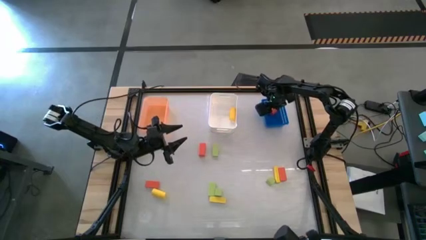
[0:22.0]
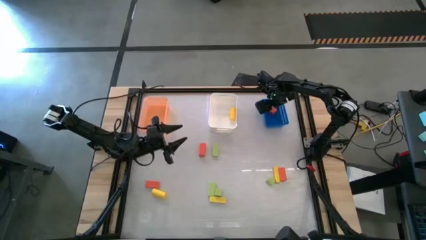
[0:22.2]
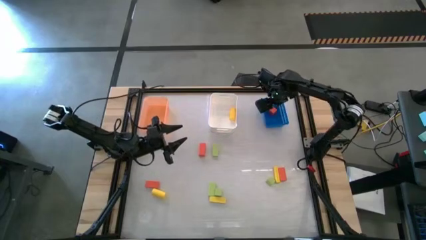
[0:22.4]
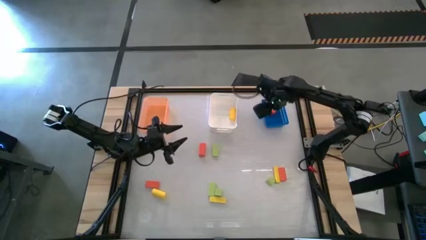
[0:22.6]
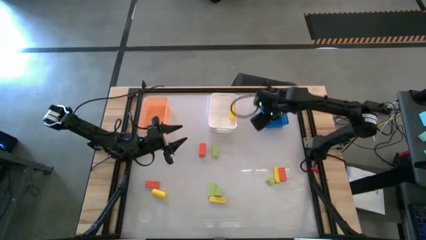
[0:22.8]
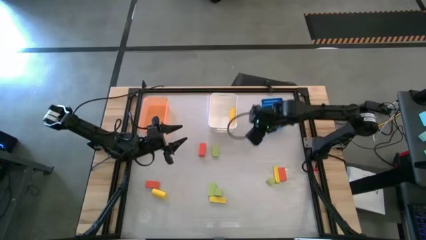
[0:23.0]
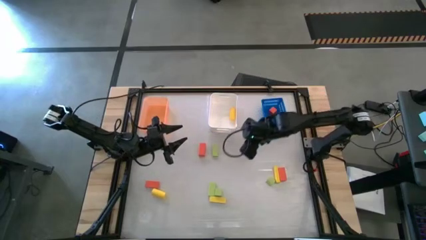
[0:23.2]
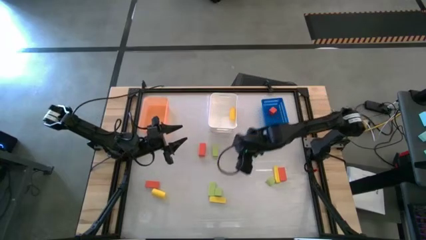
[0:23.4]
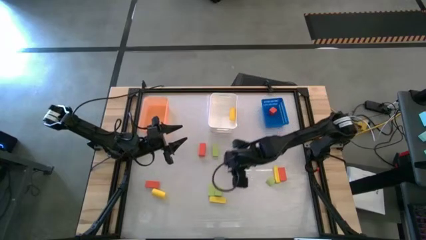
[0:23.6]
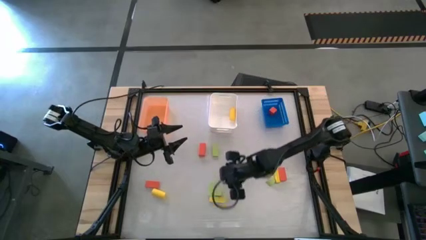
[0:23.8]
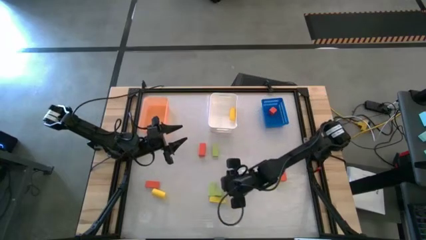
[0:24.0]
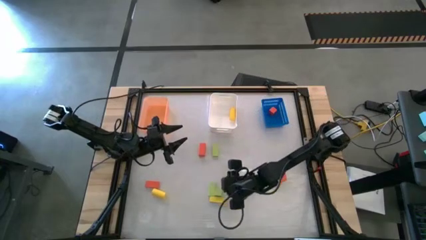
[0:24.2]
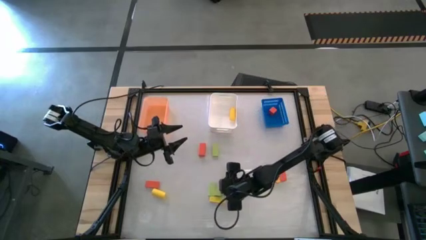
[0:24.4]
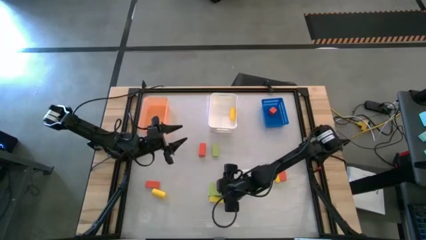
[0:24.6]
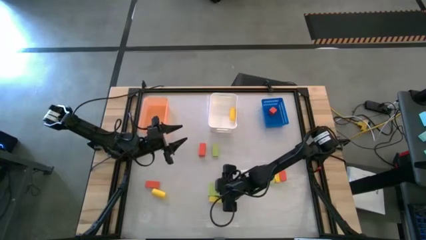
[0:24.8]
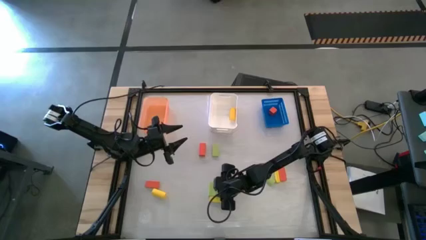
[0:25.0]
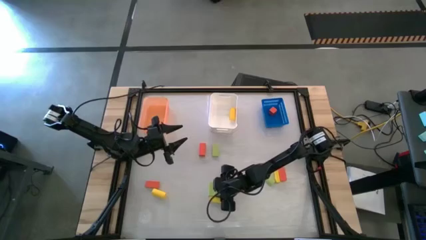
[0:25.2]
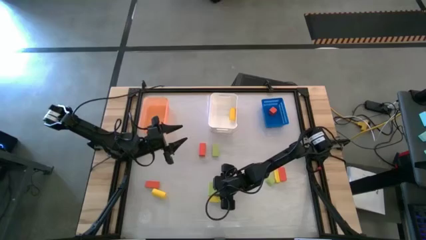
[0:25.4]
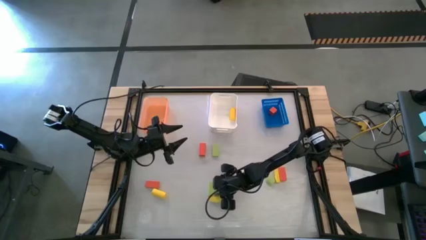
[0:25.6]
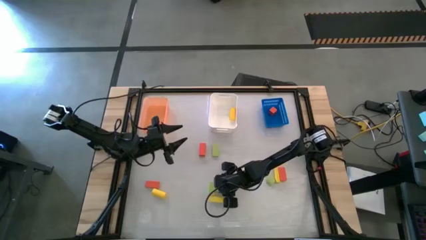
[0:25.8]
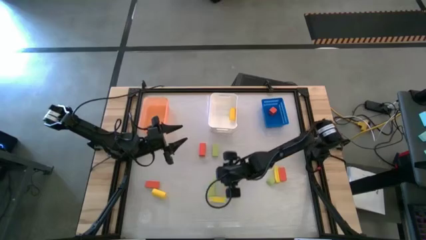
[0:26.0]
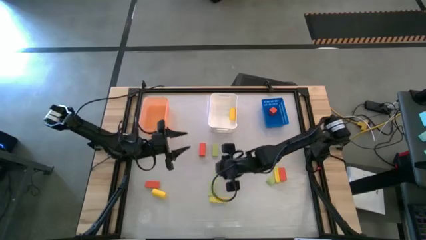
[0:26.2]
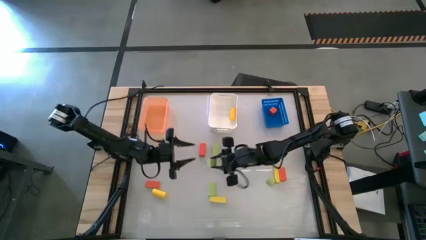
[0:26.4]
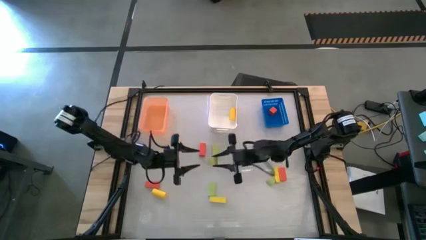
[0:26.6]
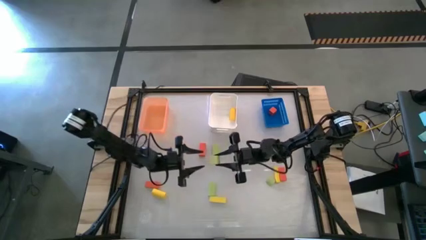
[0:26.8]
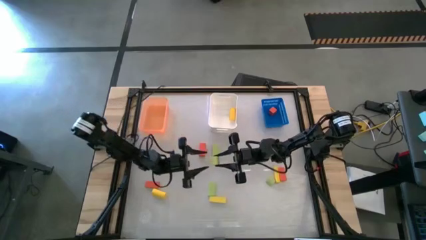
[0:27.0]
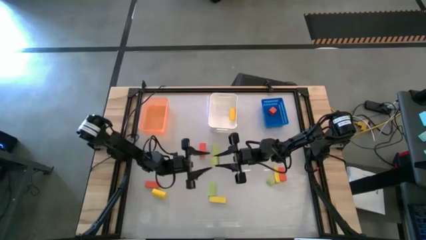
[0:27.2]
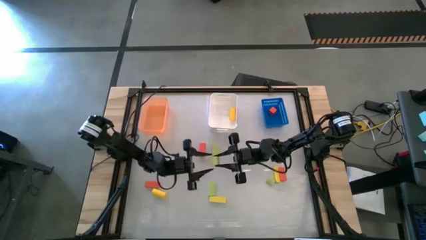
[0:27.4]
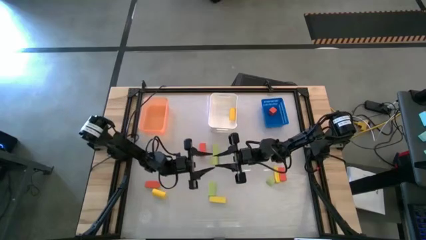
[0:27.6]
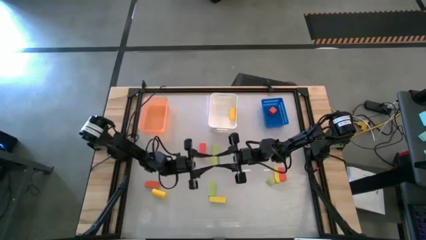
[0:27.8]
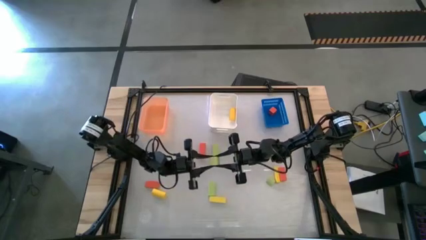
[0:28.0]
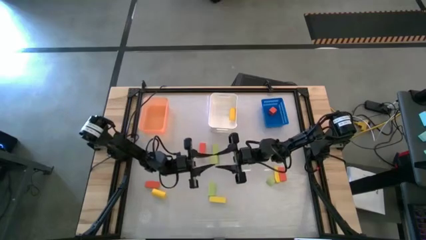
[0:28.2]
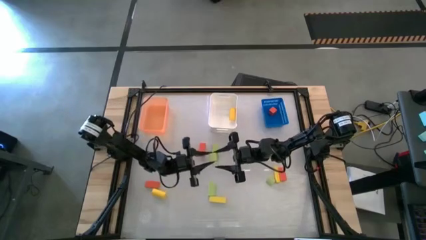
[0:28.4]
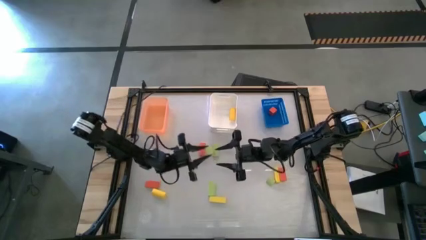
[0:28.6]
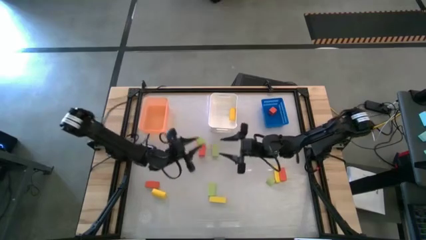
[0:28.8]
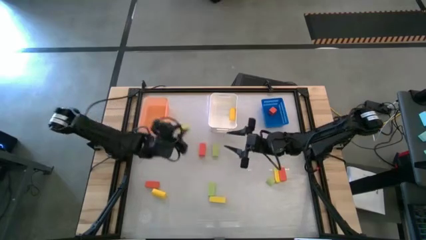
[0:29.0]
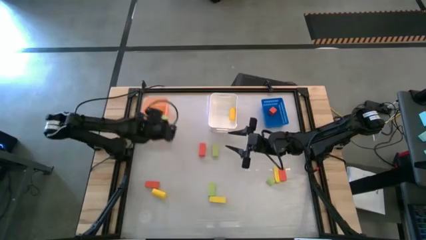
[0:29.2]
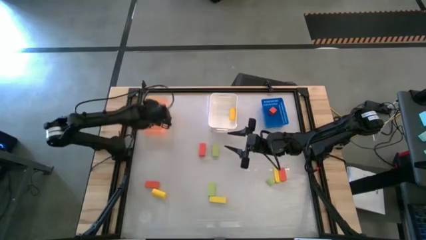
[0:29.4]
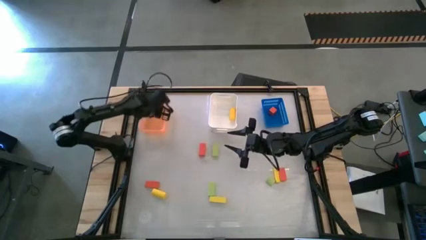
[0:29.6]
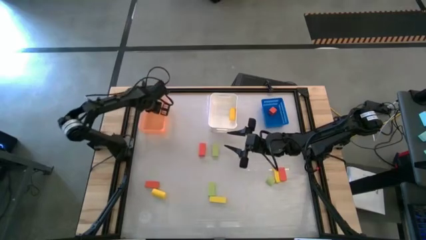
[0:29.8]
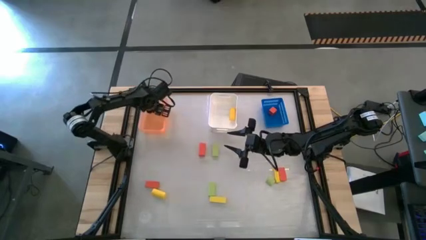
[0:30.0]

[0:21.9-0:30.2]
Task: Sort & place blocks by color
Put the bottom right green block into the orange bin

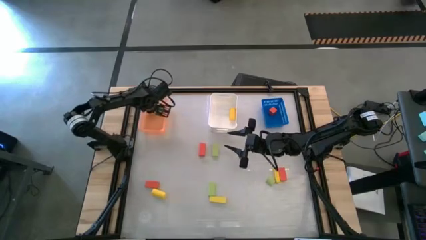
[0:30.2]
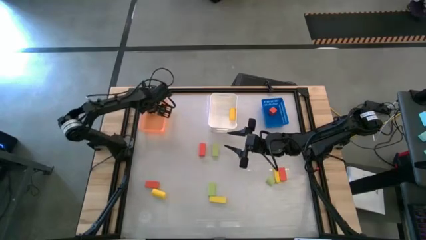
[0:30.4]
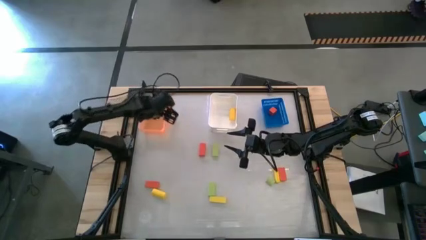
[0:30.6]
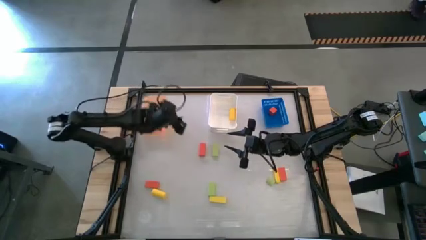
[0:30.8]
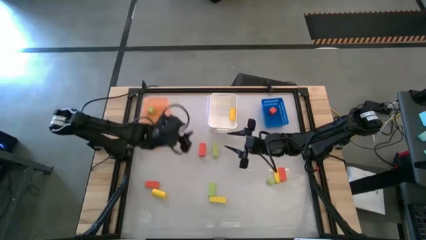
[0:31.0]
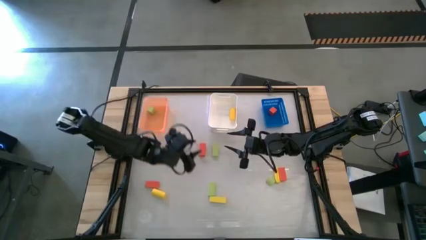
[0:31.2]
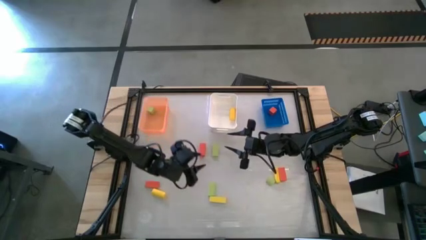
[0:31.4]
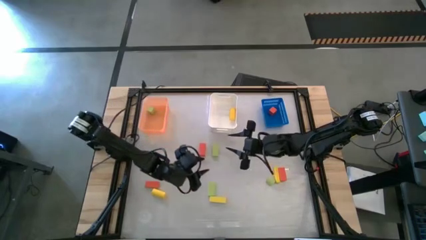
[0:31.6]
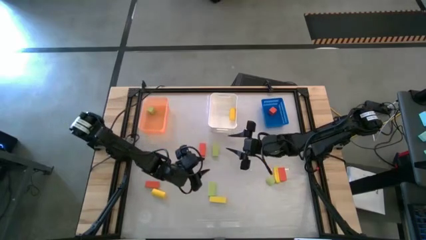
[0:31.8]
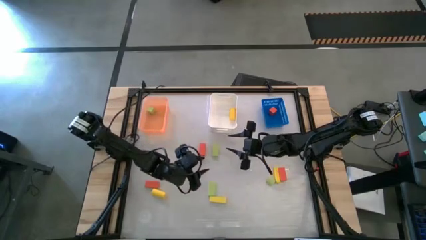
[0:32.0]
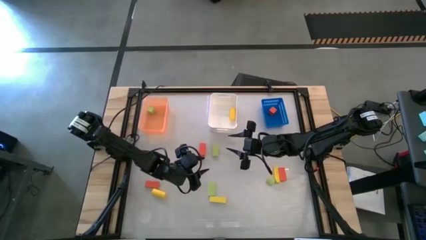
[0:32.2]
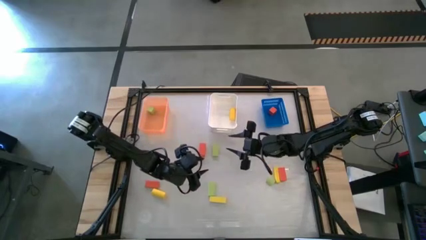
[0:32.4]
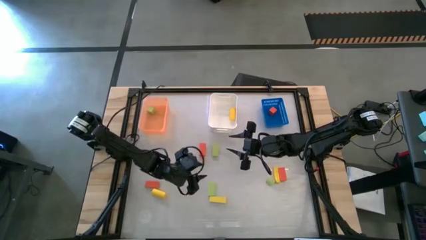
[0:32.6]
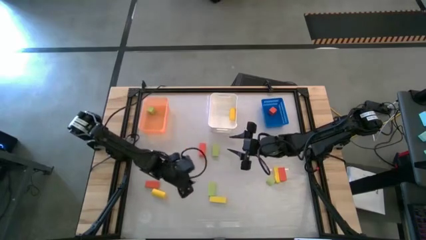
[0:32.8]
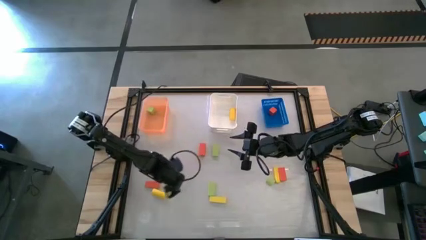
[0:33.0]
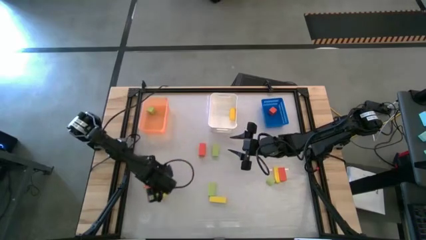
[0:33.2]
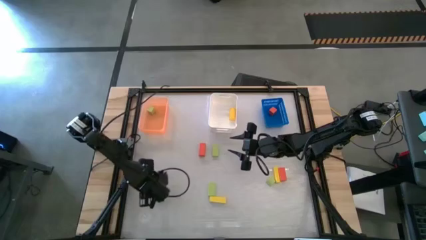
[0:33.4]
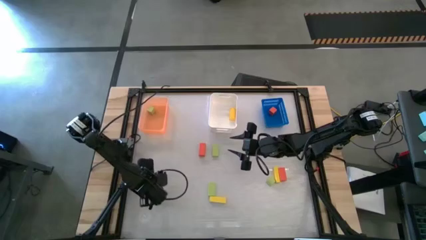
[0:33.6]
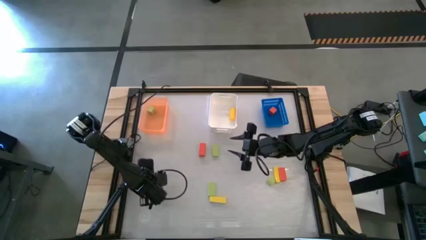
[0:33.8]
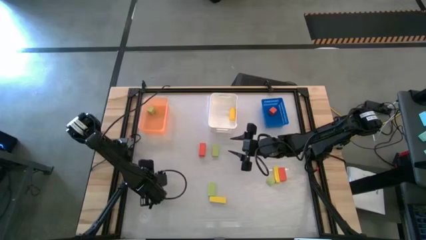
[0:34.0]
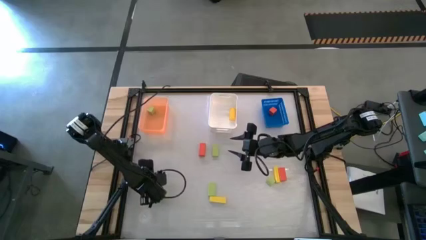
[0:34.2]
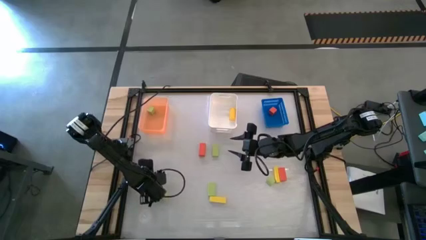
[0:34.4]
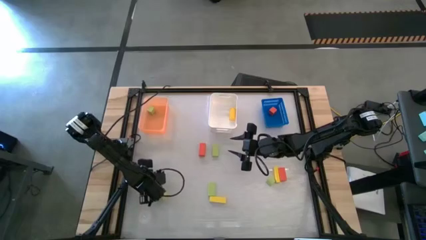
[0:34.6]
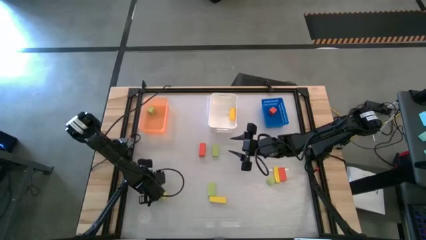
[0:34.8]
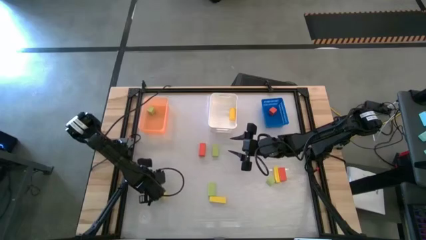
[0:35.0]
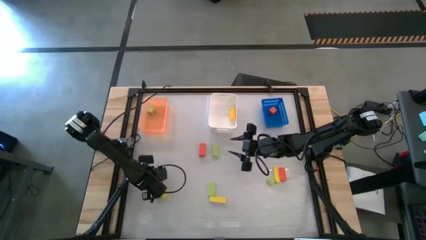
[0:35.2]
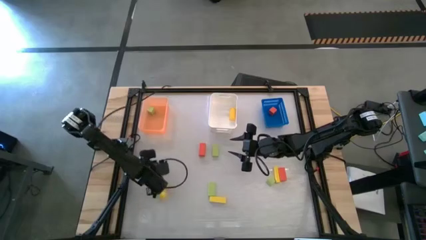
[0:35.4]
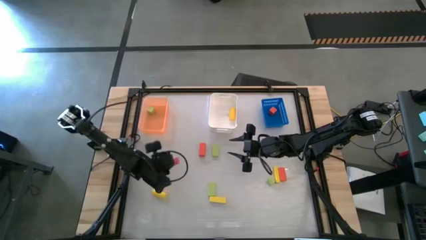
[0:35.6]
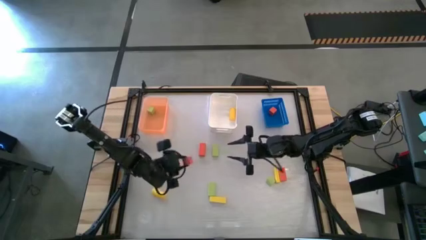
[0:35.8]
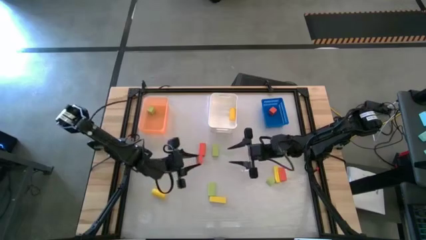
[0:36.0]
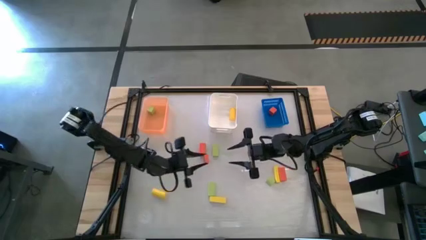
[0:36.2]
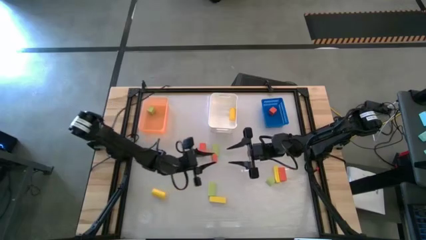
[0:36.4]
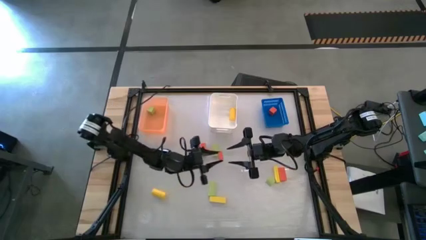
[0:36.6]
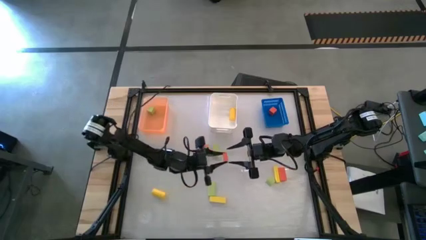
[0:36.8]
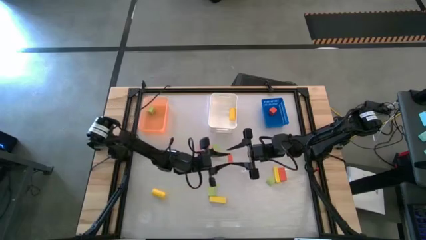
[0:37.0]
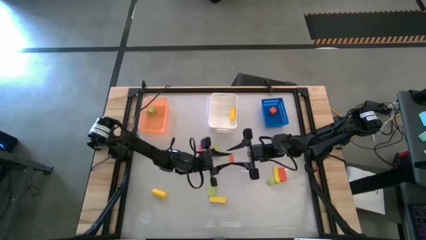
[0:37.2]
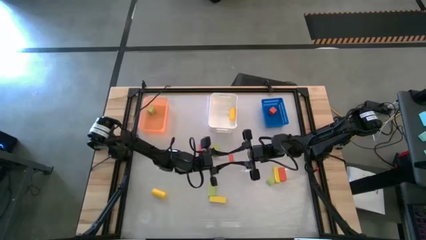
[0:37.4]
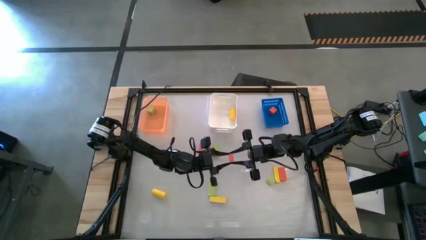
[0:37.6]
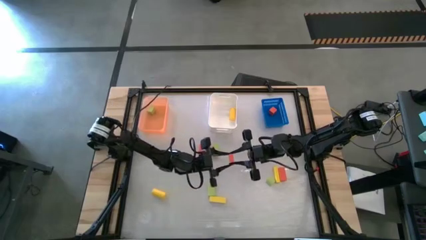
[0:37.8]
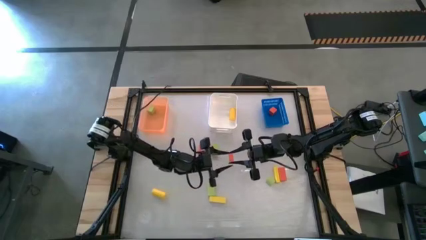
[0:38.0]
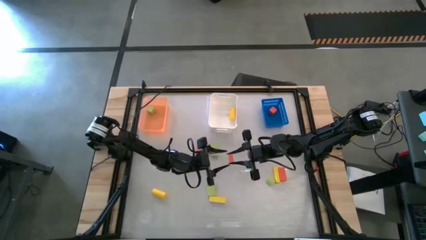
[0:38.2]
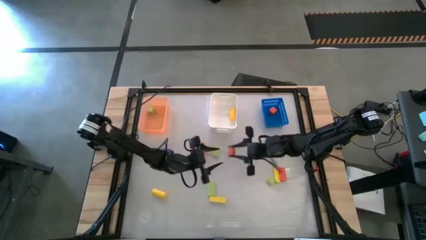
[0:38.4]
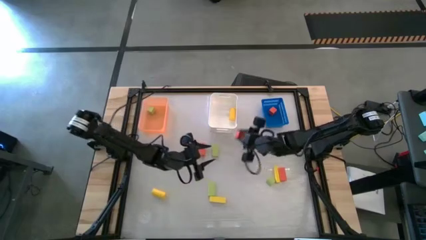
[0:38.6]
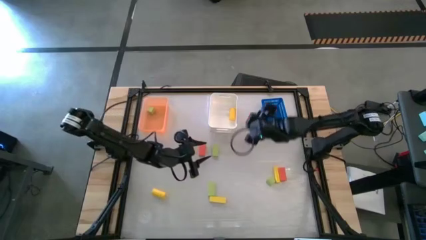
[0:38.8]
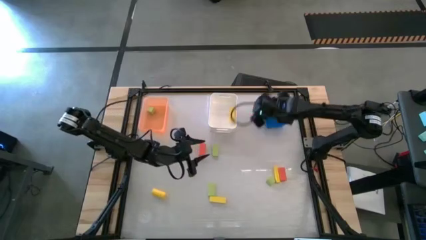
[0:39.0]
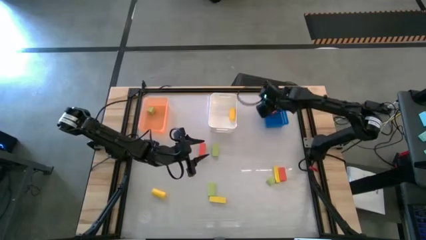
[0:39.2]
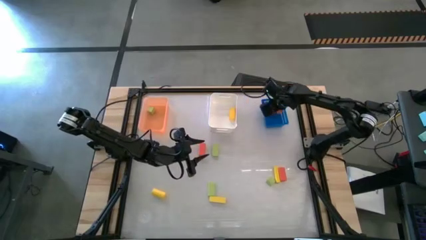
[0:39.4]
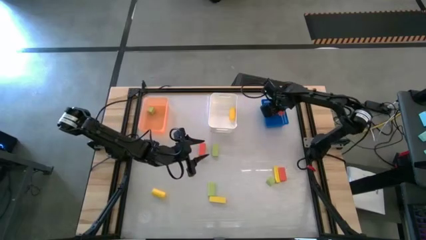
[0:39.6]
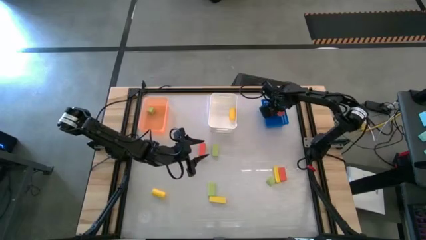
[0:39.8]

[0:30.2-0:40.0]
Put the bottom left orange block into the blue bin
